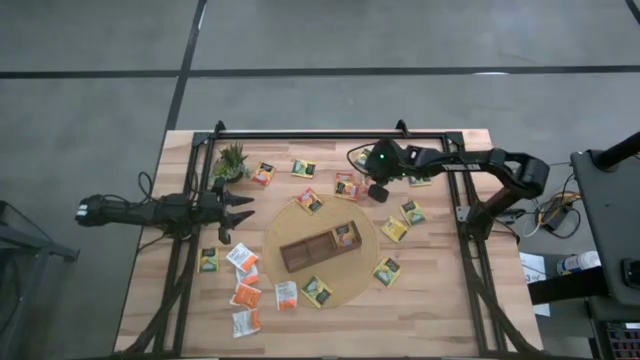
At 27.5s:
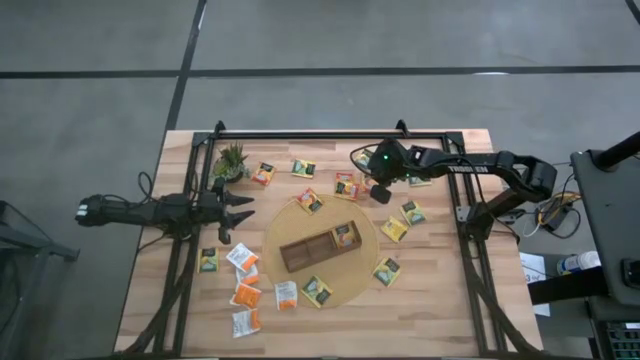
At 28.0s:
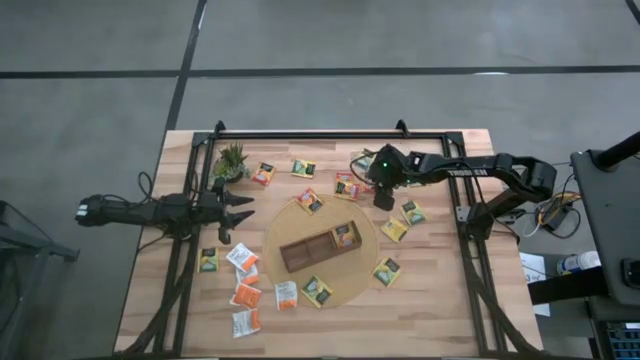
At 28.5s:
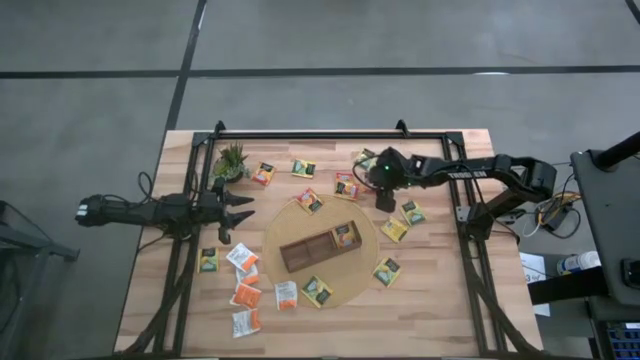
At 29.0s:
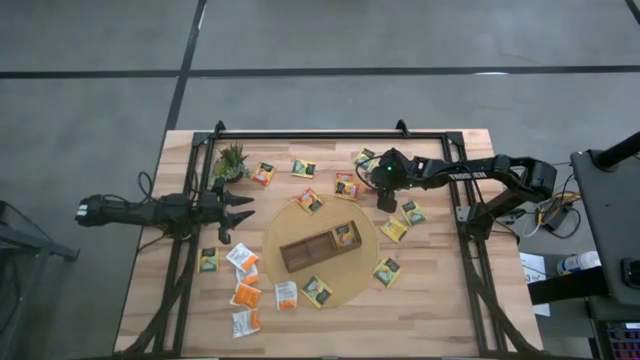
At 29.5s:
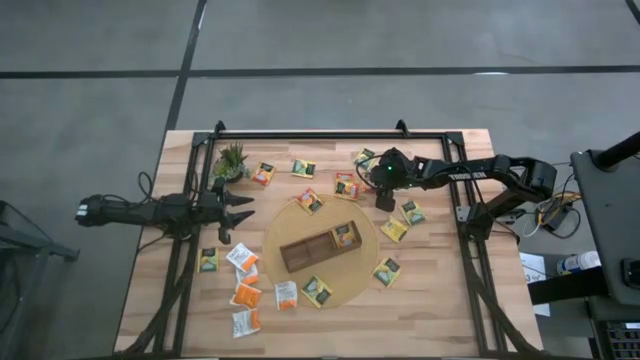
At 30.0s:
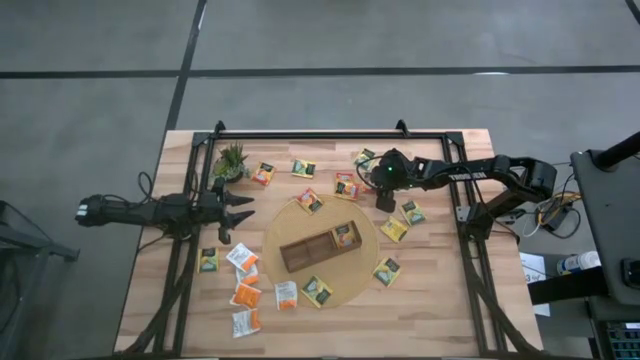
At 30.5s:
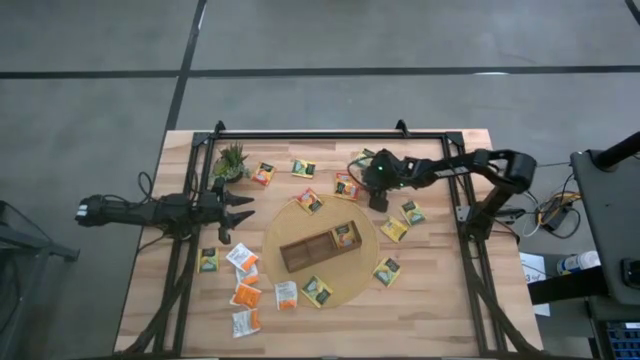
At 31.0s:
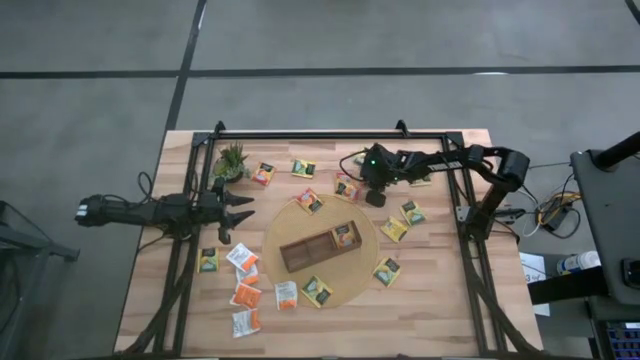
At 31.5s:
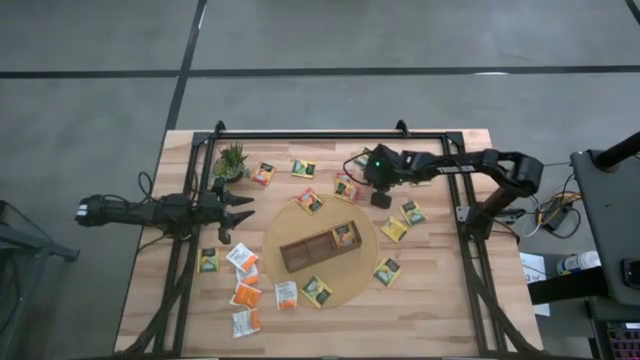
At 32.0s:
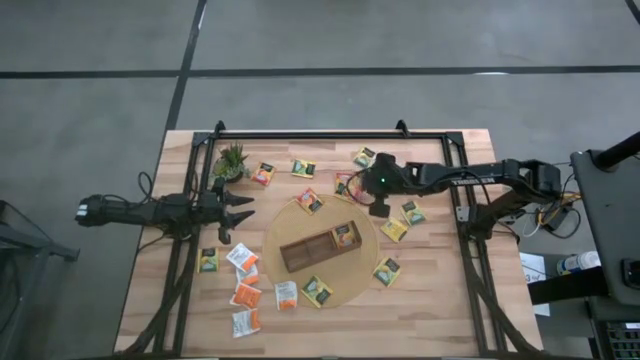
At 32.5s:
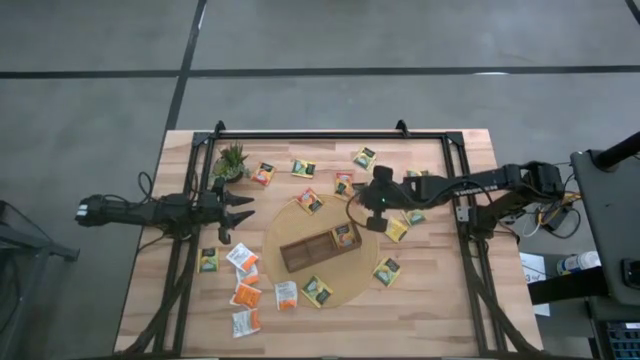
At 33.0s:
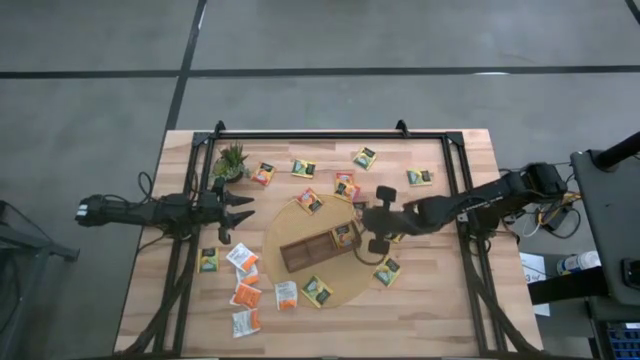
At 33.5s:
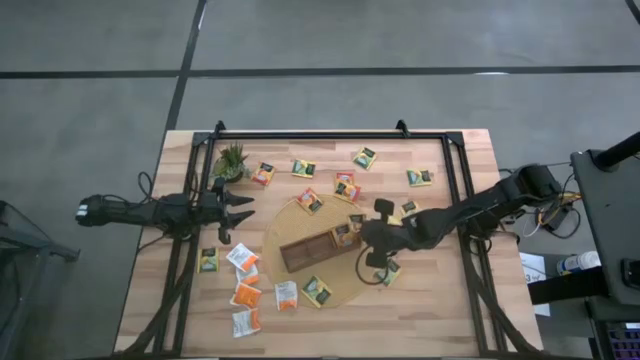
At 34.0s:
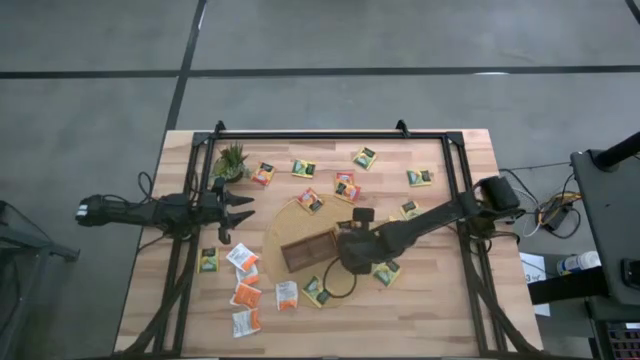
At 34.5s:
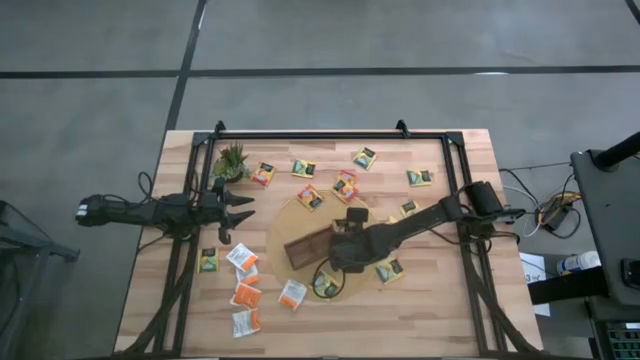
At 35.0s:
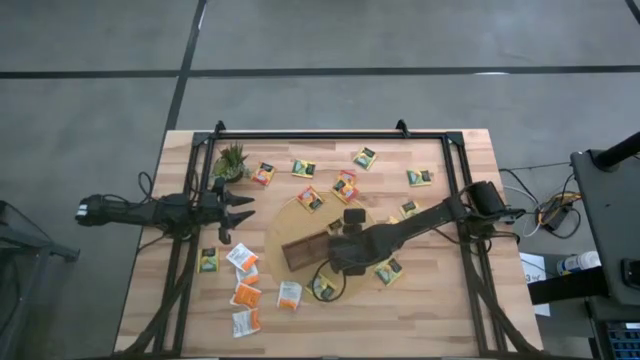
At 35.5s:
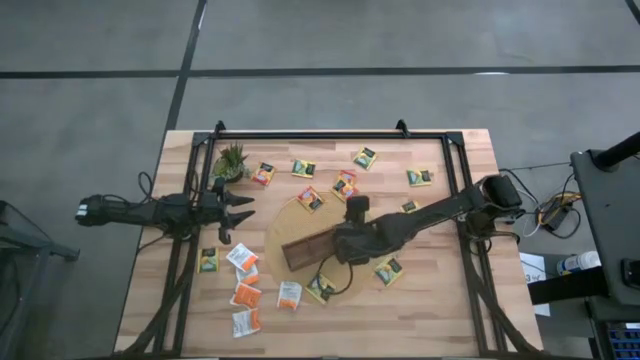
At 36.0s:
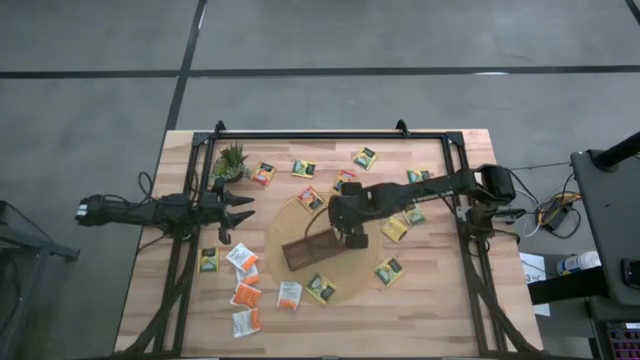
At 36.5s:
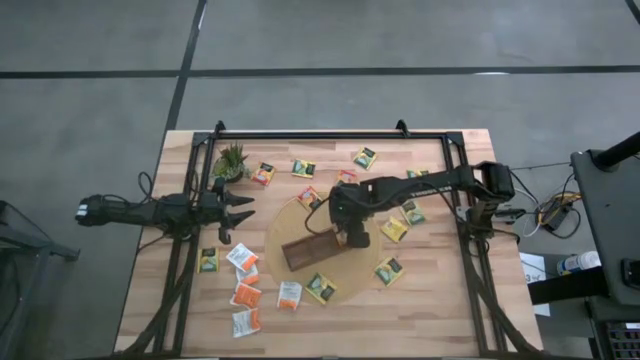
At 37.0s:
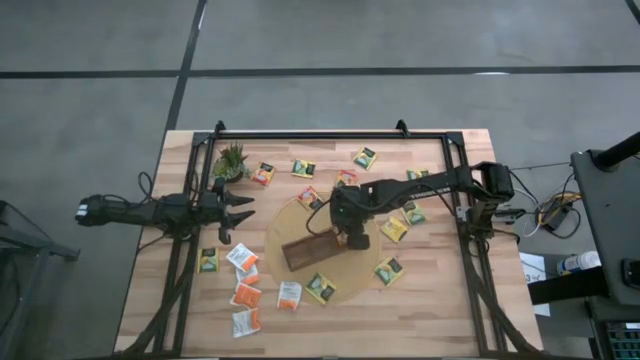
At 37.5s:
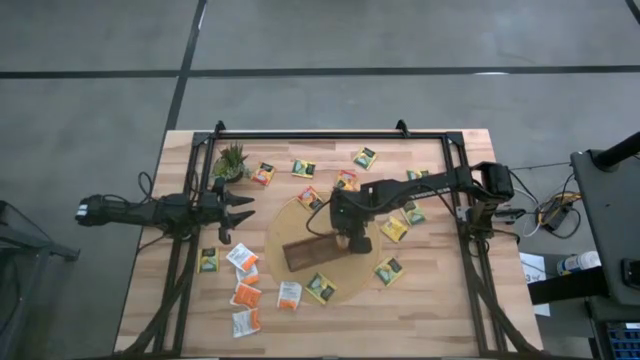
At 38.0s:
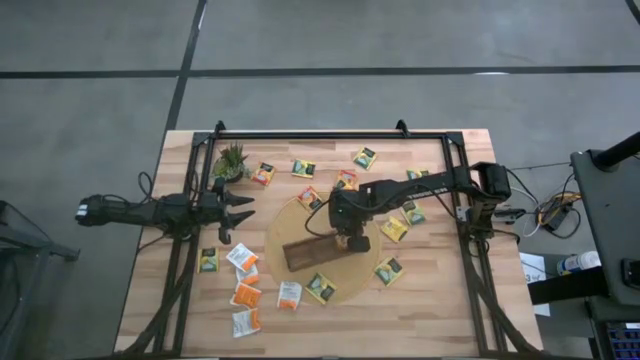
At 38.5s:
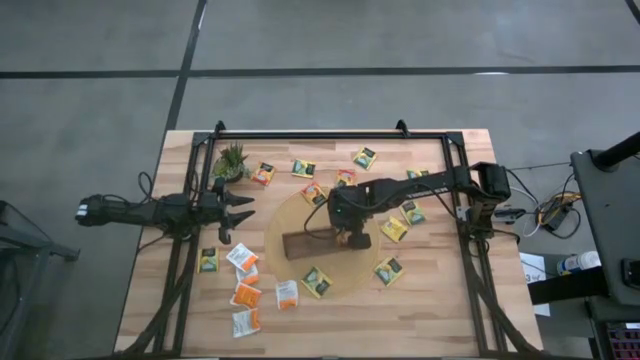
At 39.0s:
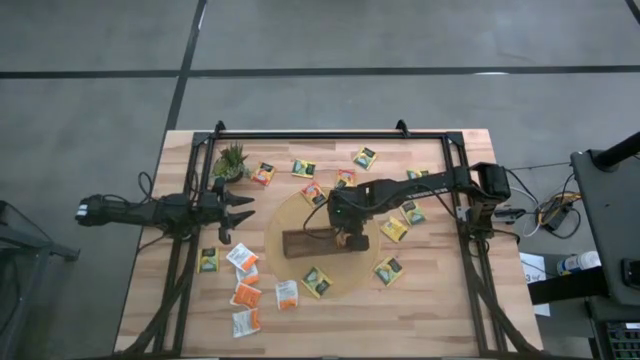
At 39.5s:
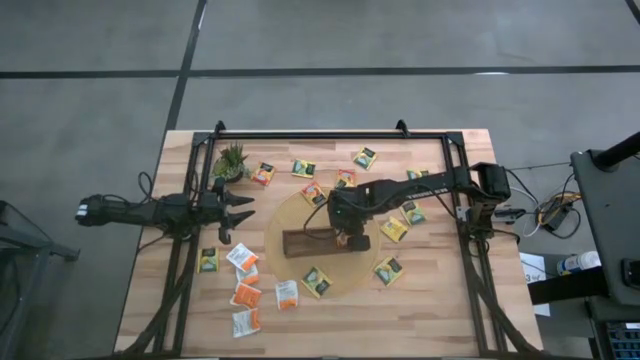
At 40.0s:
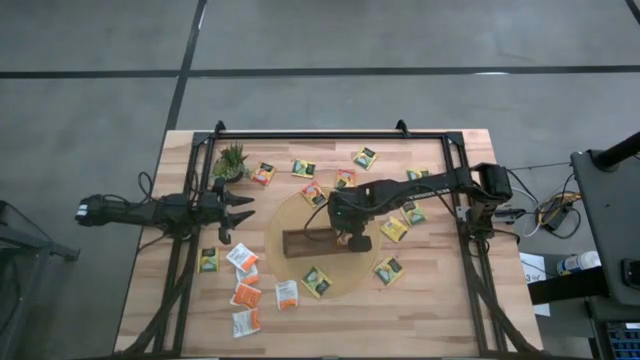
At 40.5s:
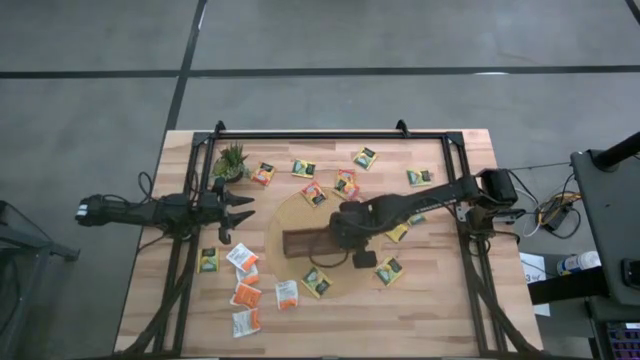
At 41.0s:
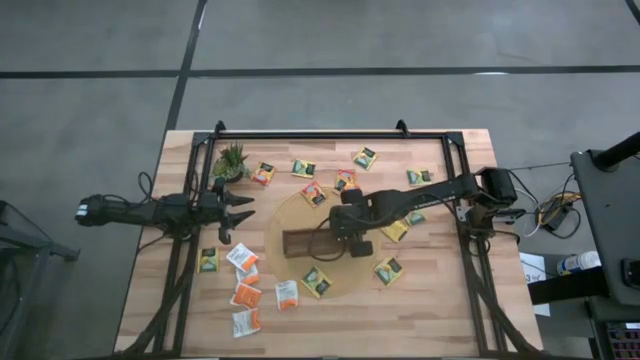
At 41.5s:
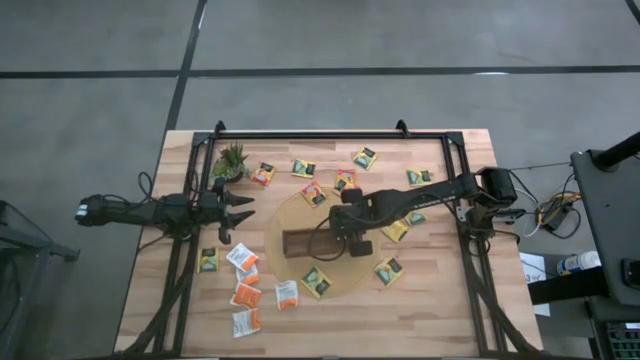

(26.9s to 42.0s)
Task: Pick & Place Tea
Put the orange tea bag into the right section of the wooden organizer

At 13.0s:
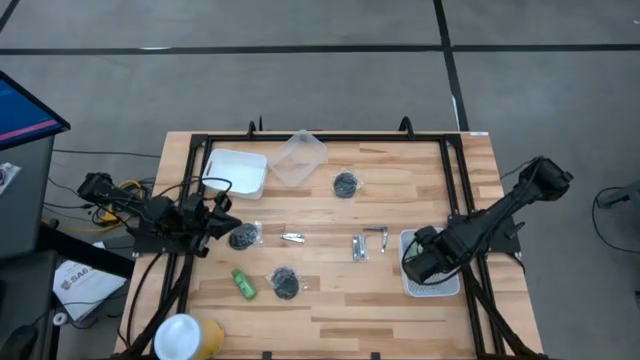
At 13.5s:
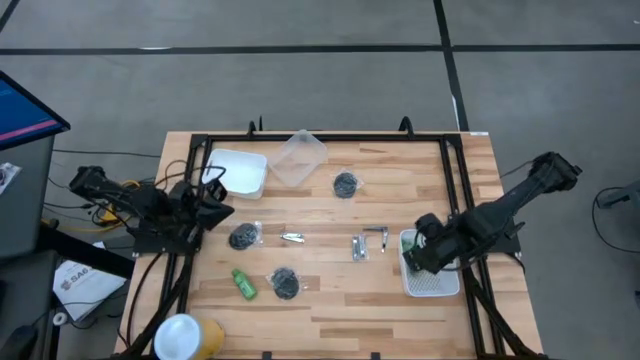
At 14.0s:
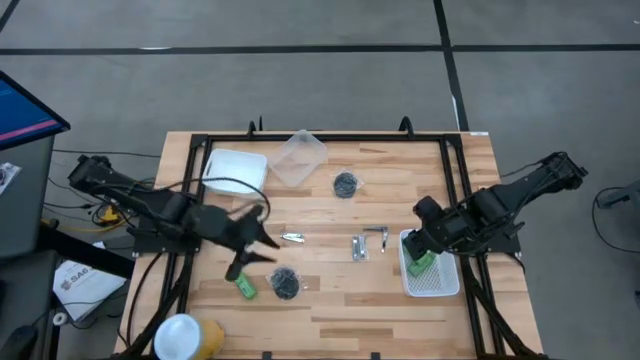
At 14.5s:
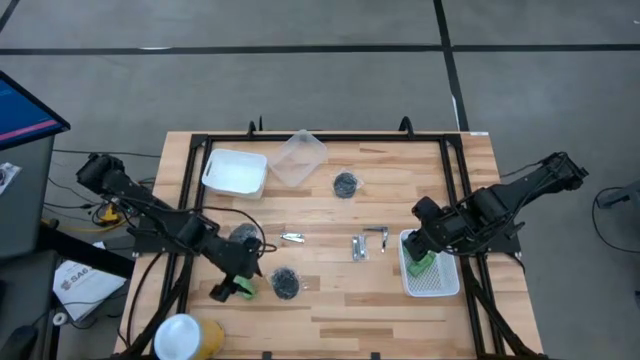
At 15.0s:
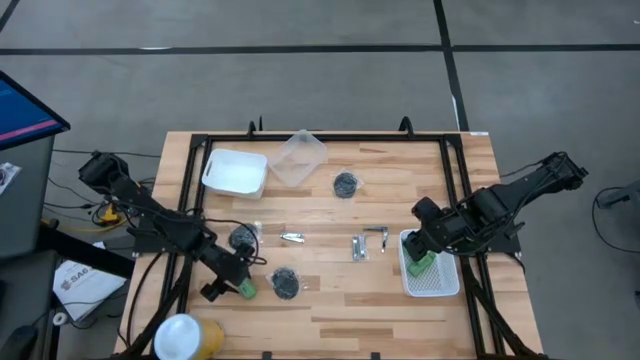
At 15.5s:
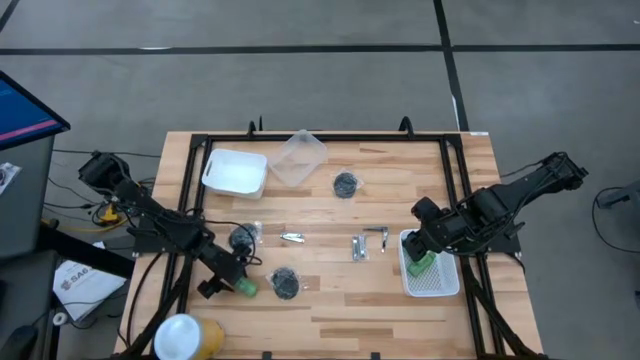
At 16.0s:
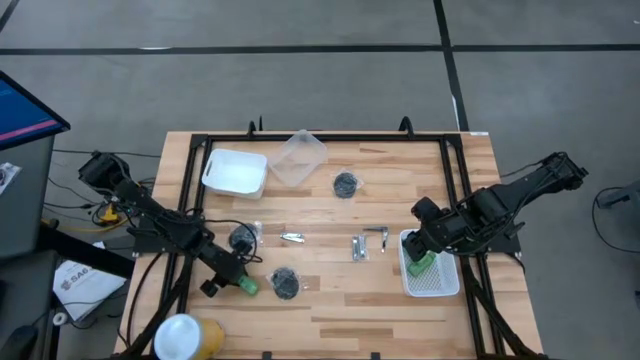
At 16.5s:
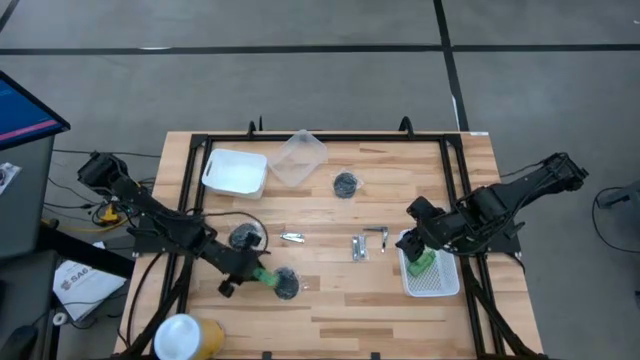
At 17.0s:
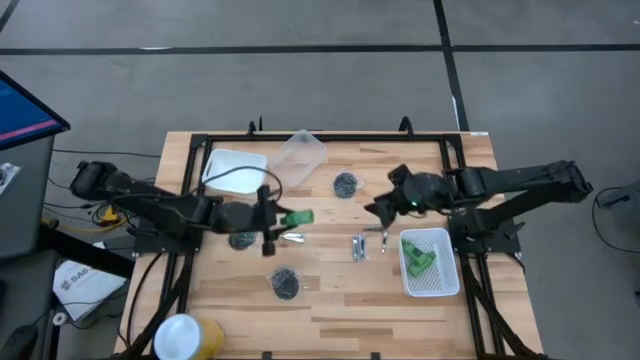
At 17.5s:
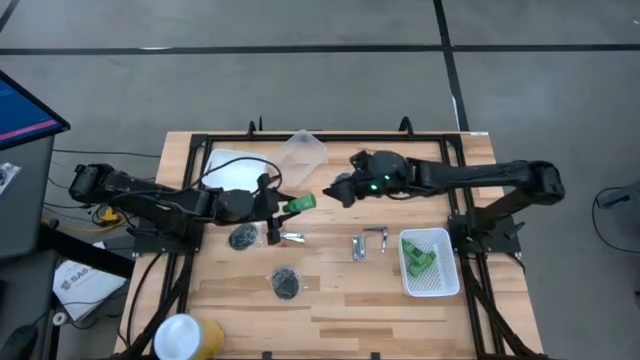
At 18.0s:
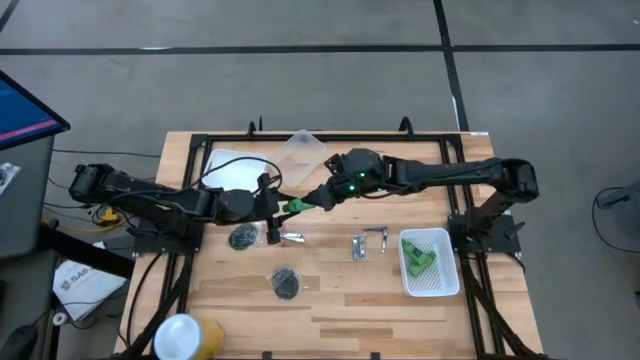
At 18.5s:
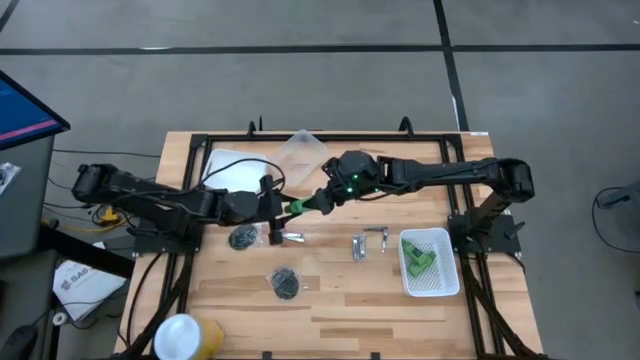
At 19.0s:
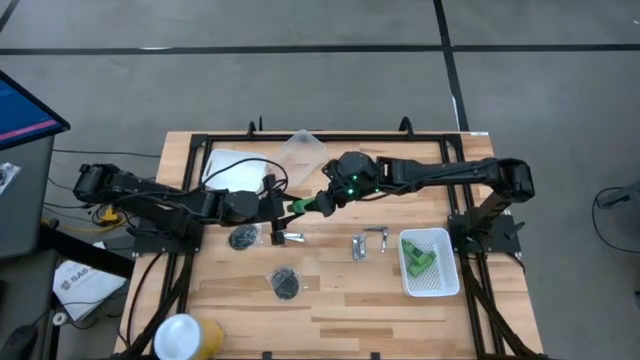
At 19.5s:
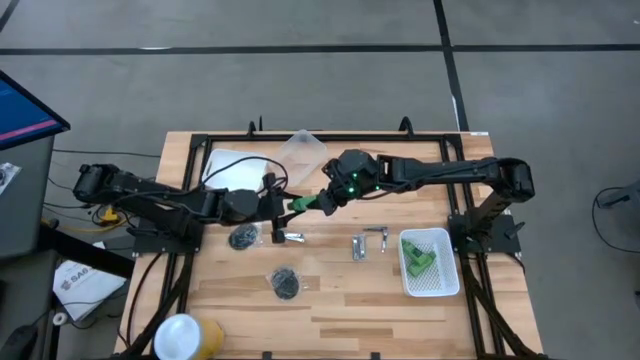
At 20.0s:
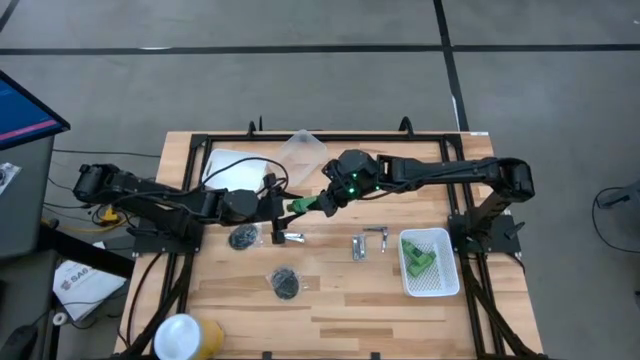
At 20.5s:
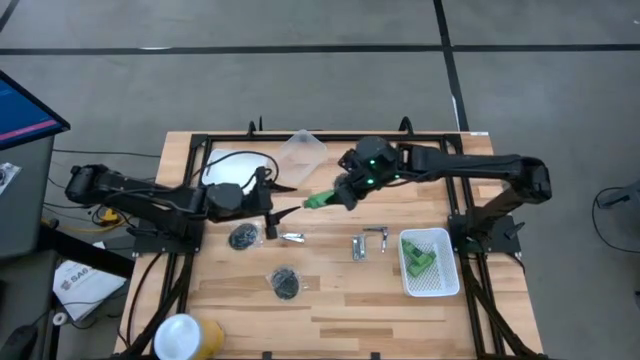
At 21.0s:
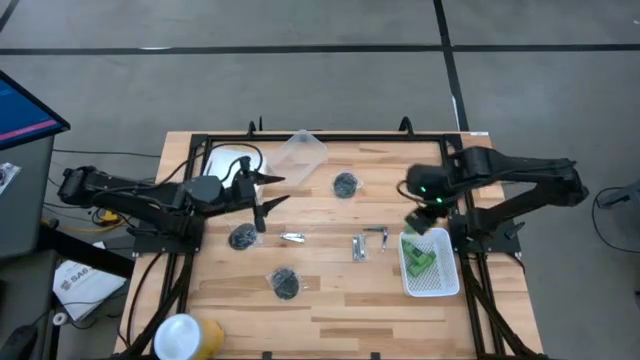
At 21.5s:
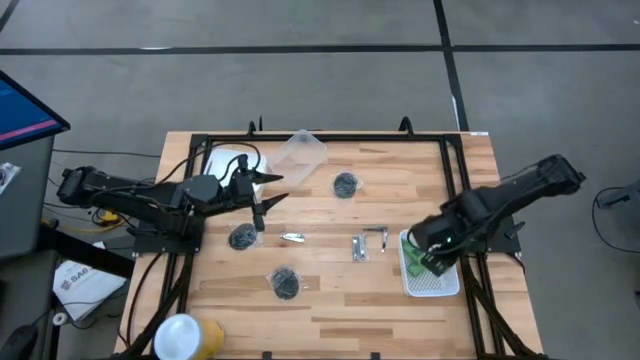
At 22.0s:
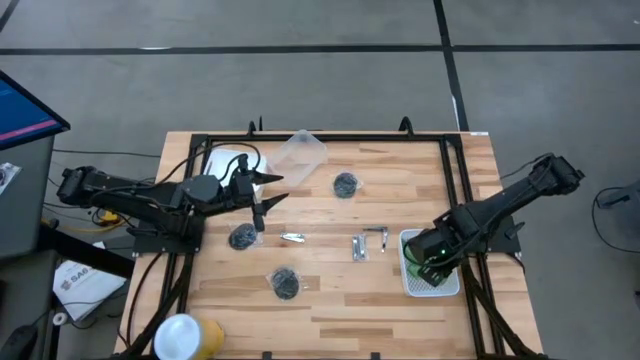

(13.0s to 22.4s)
Task: Pick & Place Travel size toiletries
Put the green shampoo into the bottom white bin
